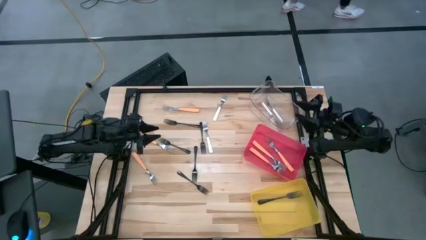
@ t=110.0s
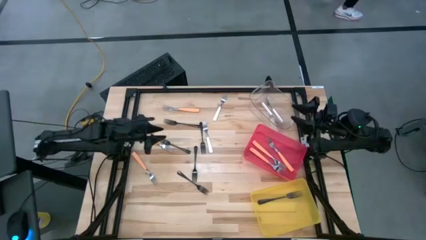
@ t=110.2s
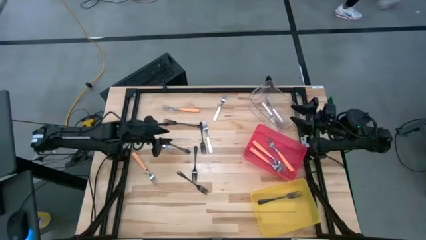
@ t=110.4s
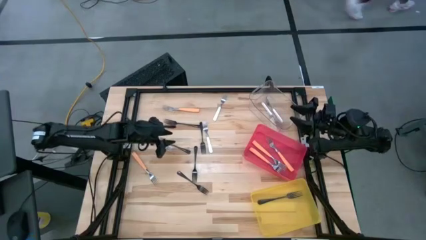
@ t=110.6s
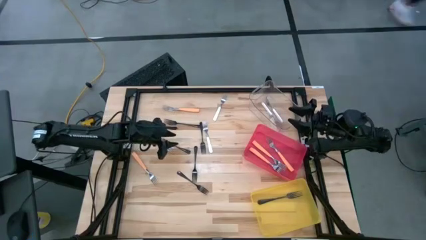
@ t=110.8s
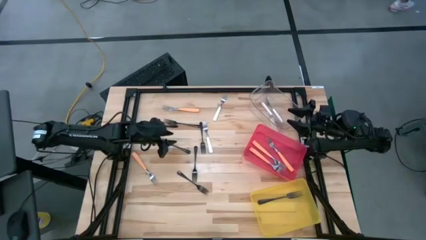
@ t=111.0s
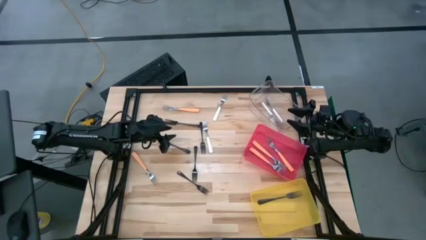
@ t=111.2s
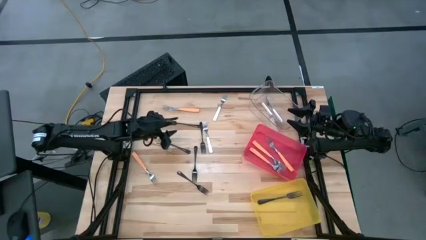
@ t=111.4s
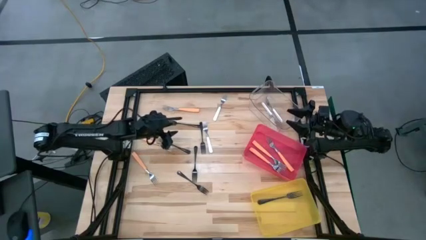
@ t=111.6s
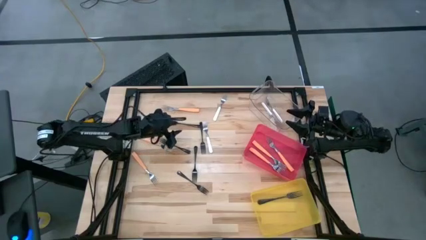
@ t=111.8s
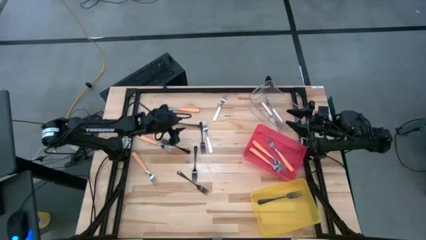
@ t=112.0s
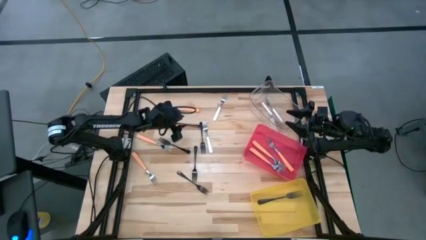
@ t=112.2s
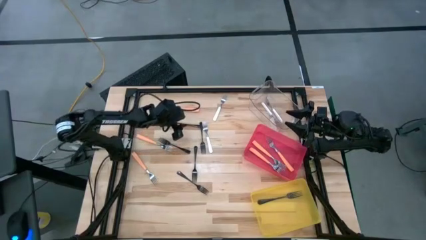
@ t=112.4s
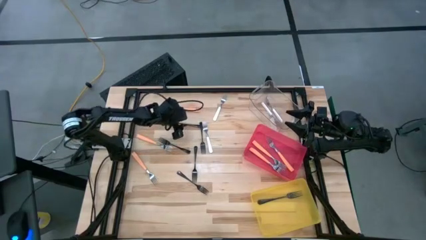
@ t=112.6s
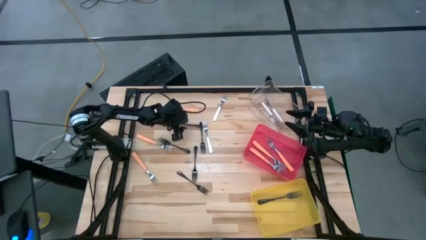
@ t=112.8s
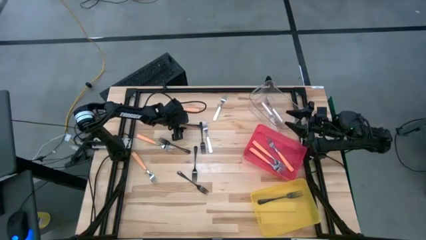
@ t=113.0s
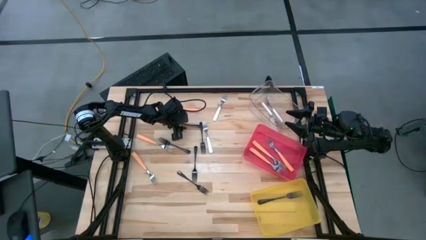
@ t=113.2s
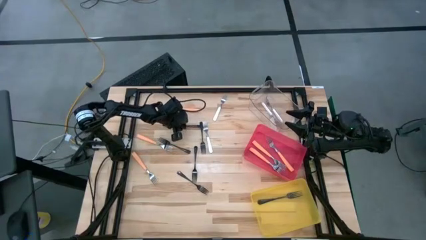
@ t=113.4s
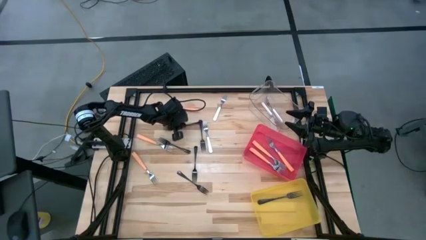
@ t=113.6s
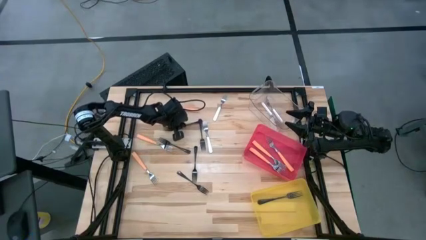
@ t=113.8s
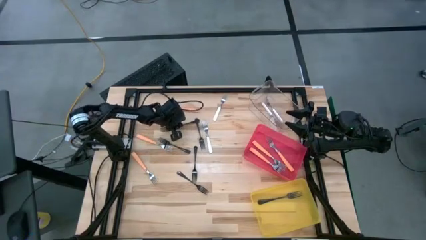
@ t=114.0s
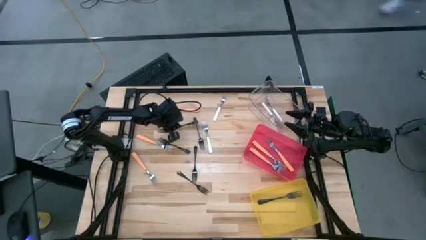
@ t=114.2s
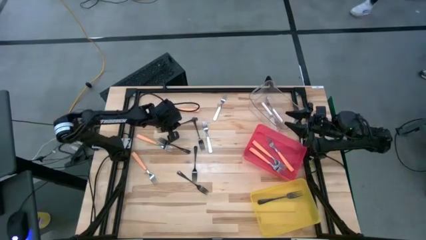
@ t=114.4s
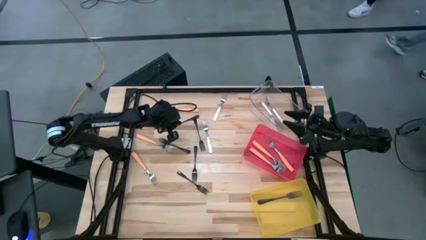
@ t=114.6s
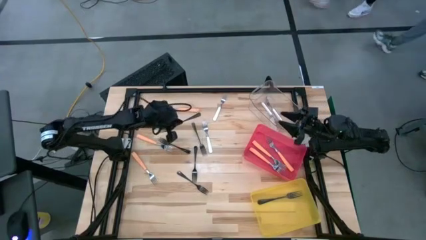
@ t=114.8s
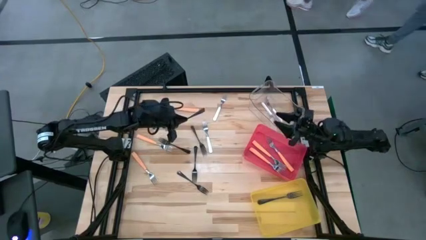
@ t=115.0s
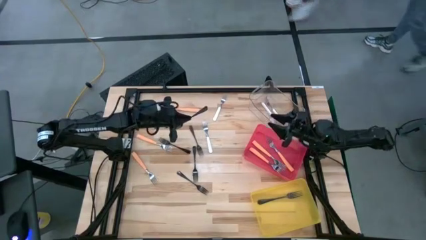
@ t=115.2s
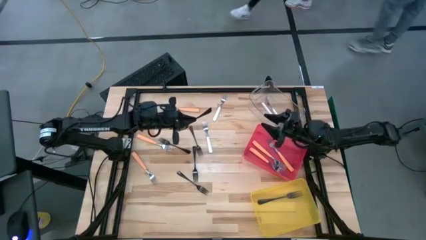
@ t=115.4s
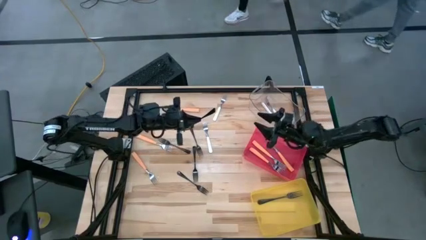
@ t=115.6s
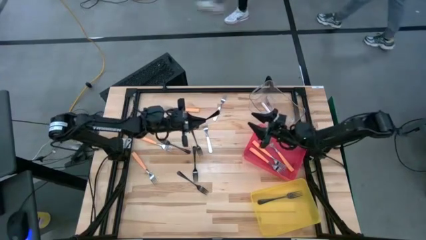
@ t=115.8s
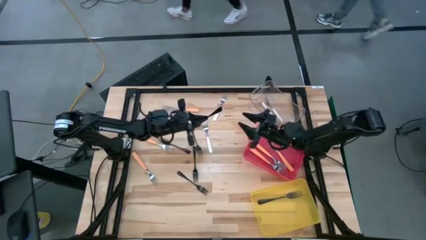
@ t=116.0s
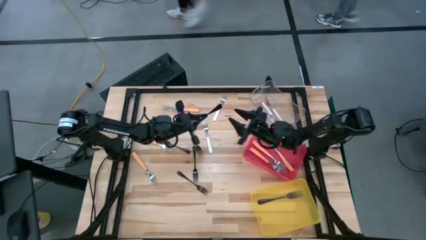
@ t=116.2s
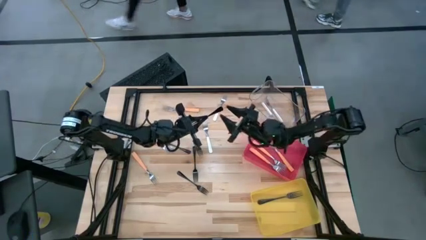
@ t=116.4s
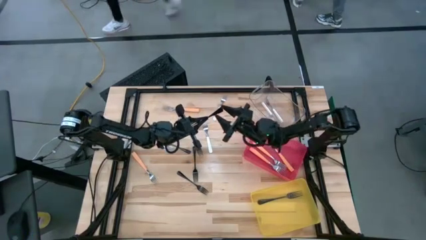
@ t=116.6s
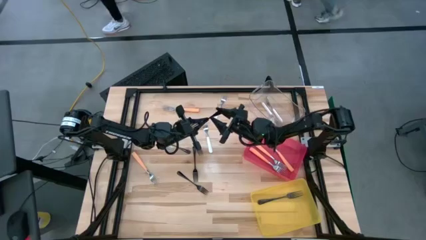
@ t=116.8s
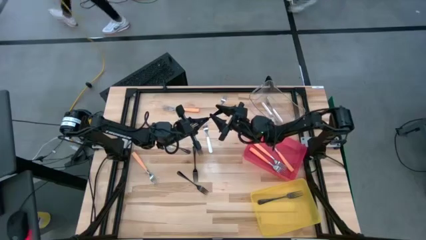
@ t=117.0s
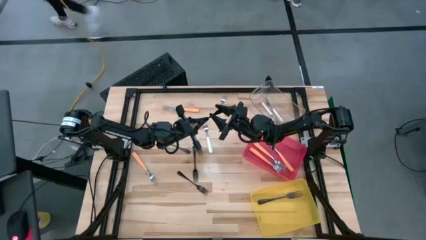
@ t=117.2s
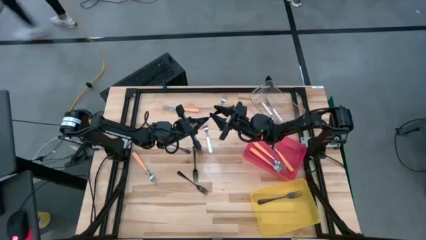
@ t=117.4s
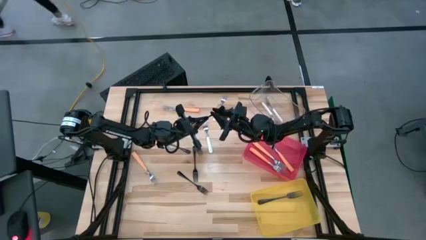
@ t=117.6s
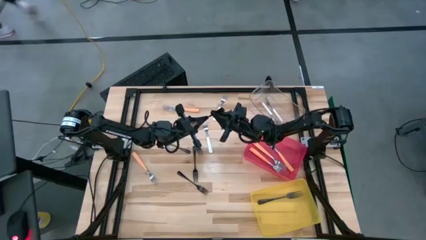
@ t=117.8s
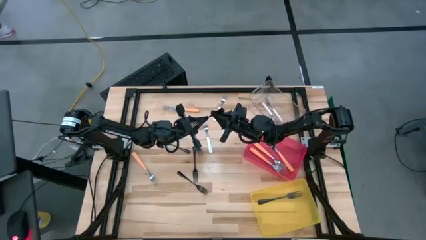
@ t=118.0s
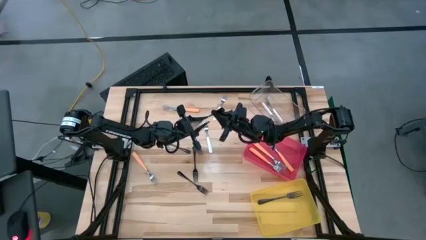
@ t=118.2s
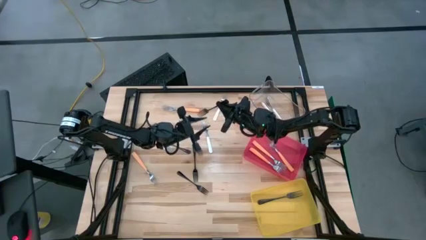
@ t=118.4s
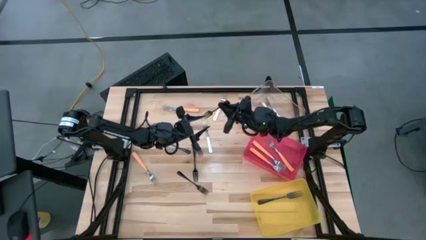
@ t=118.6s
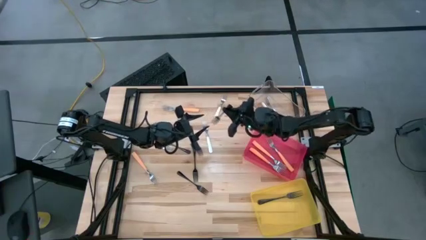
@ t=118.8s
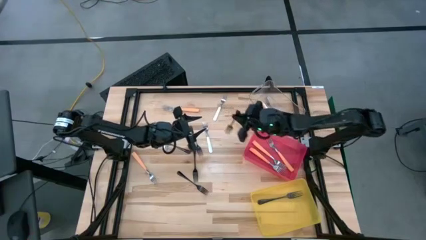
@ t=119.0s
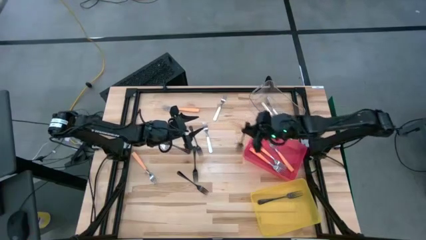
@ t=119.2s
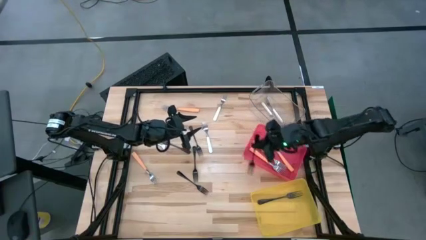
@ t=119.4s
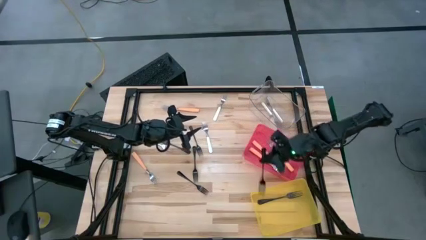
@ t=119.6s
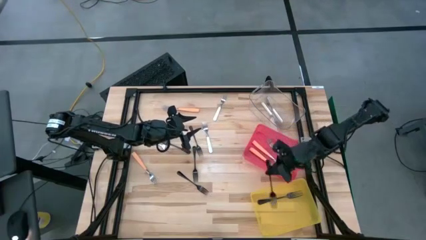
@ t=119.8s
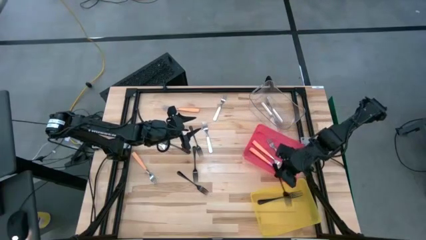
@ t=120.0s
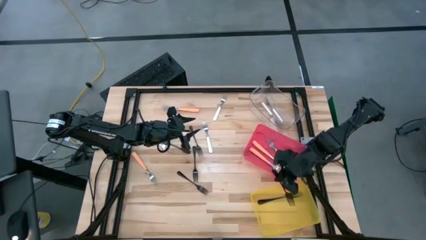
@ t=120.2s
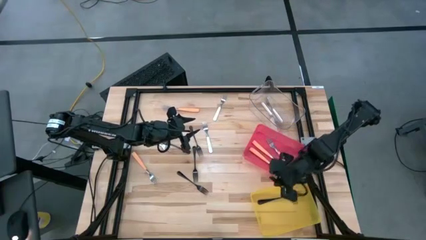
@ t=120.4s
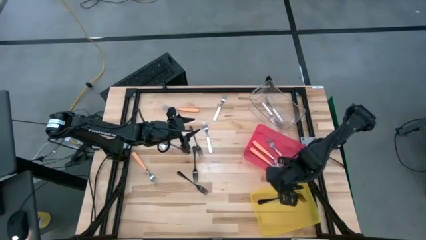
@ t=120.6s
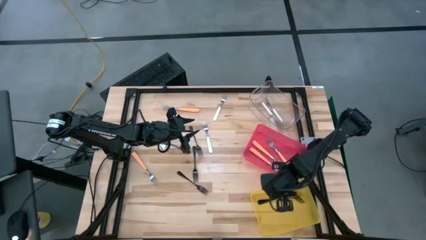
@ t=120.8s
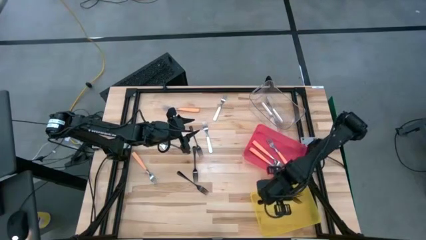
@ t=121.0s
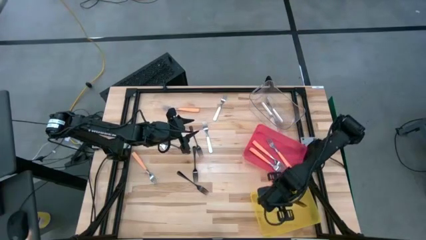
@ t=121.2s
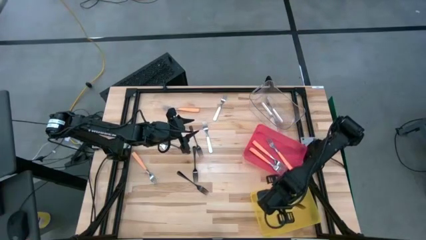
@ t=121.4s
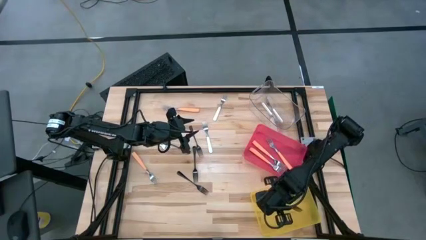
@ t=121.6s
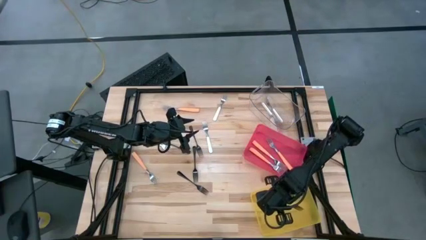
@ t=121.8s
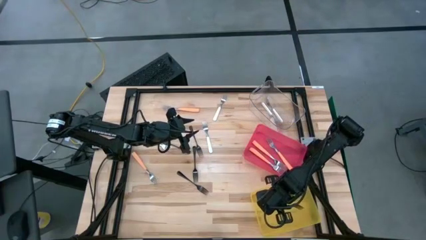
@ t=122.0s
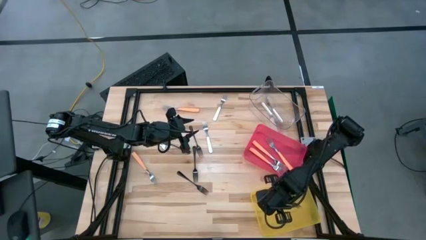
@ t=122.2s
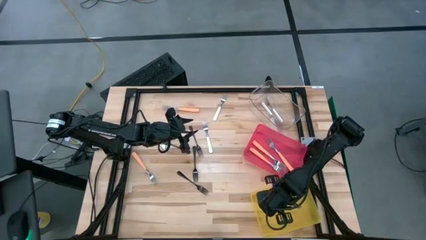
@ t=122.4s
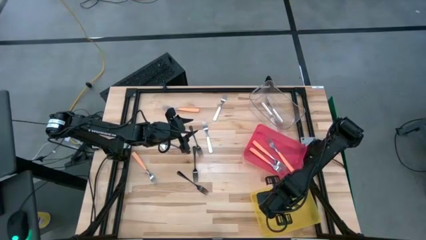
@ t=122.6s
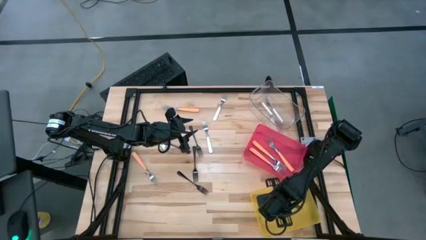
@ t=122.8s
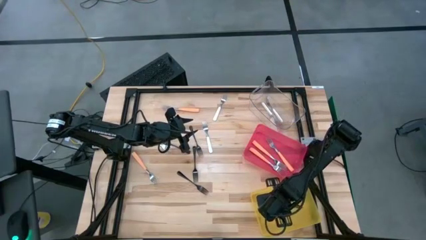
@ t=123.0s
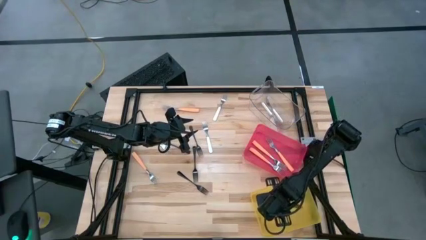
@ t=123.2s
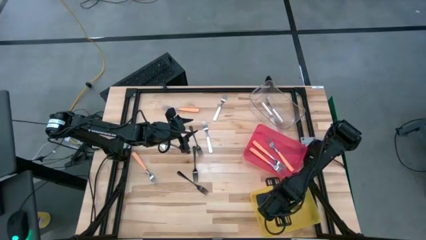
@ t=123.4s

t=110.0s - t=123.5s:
Task: Sort silverware by color (type)
Put the black fork into the yellow bin

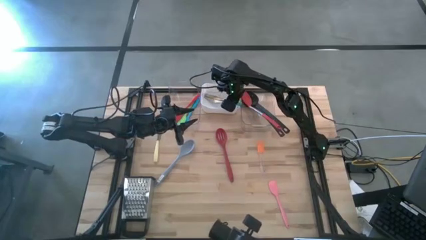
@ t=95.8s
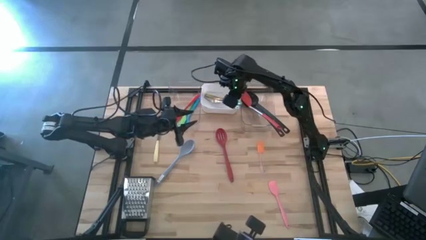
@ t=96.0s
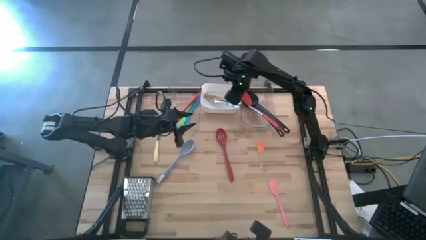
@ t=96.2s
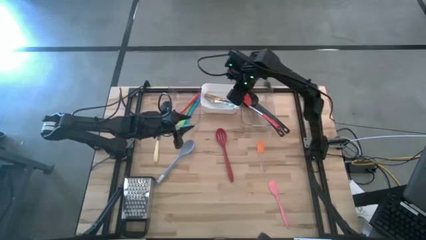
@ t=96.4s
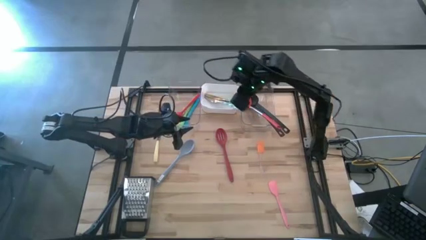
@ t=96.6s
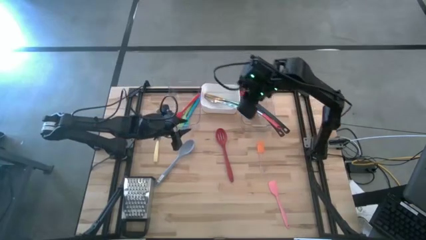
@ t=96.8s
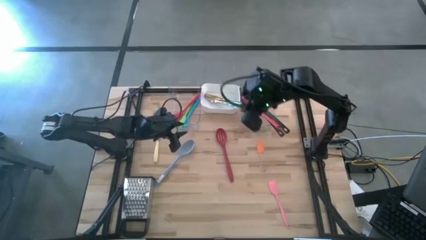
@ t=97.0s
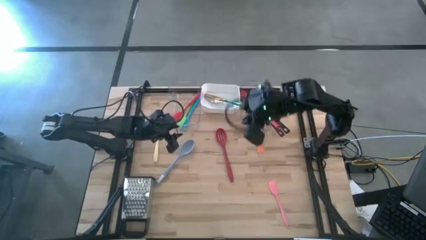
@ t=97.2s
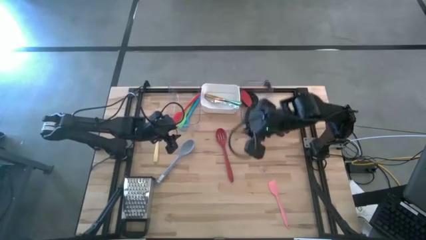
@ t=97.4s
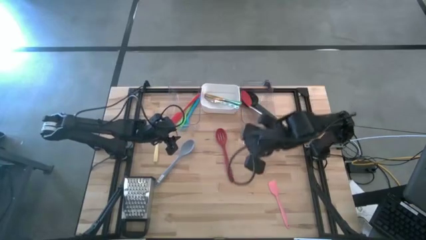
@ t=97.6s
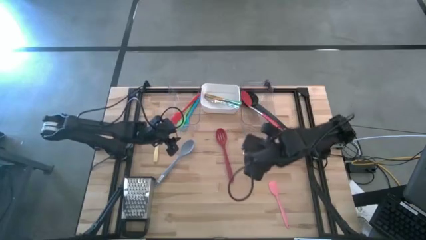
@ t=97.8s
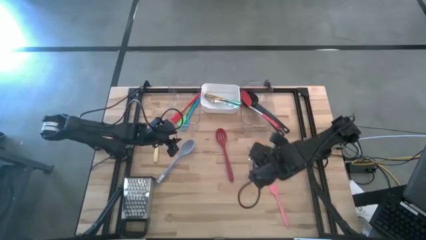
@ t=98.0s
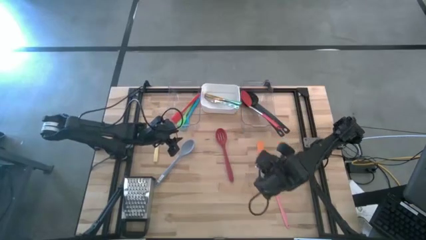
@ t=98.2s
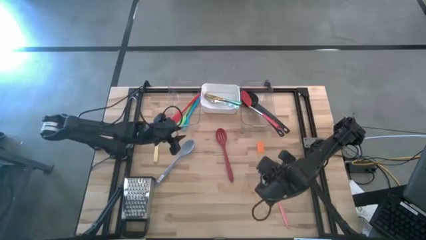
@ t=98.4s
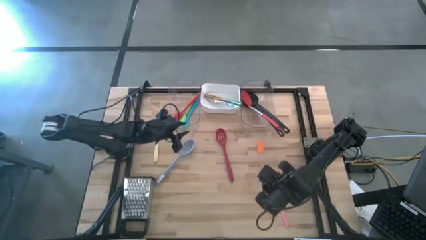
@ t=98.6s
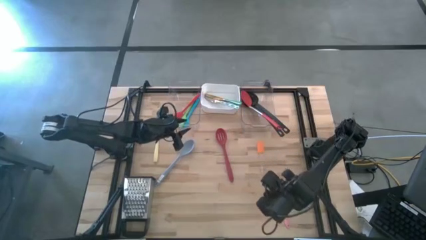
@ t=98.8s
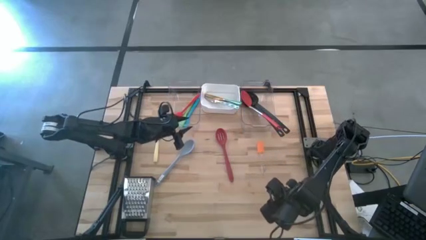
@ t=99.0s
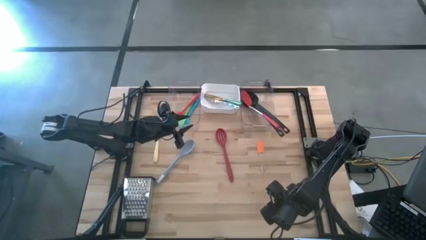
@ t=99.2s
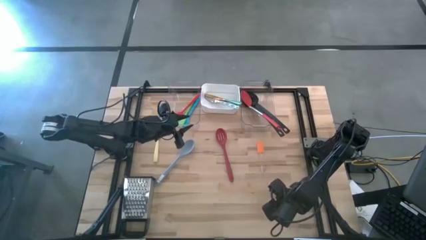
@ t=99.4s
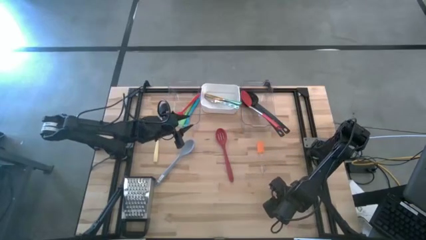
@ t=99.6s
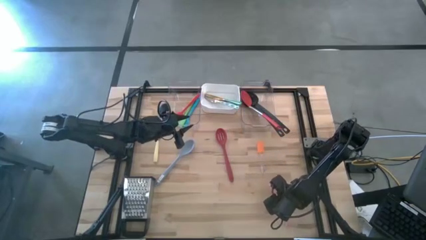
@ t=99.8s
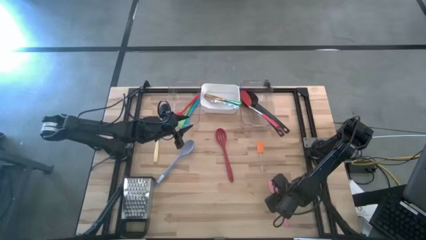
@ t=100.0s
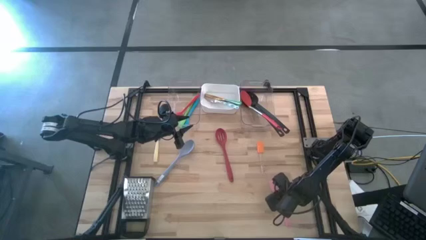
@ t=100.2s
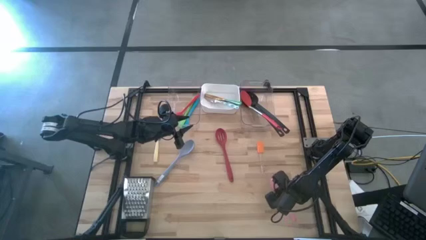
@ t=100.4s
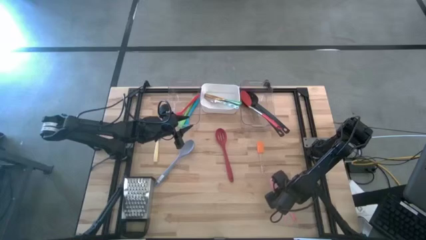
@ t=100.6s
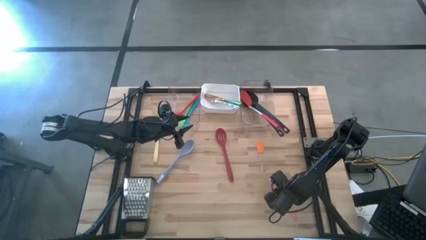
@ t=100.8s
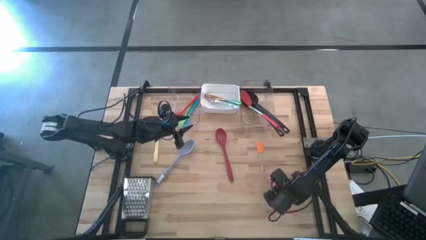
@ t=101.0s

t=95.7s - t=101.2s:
Task: Pick & Place Kitchen Items
Put the pink spatula into the left transparent bin
